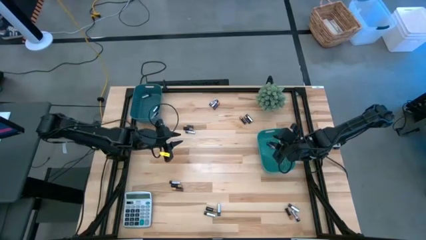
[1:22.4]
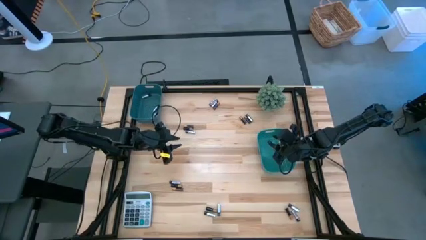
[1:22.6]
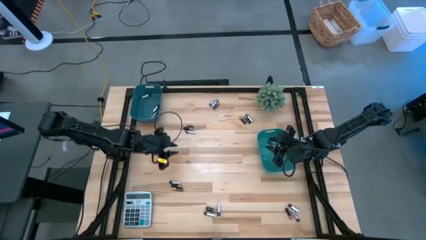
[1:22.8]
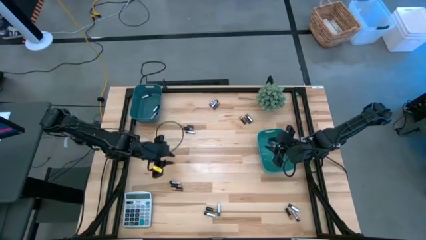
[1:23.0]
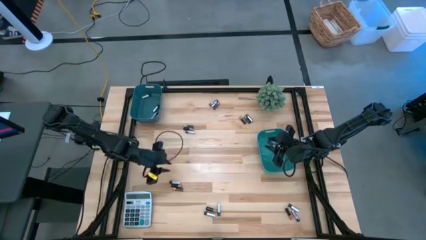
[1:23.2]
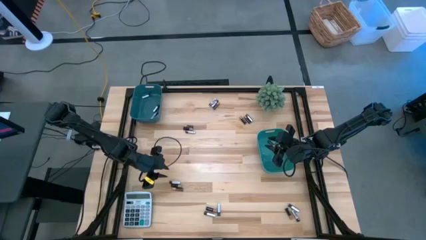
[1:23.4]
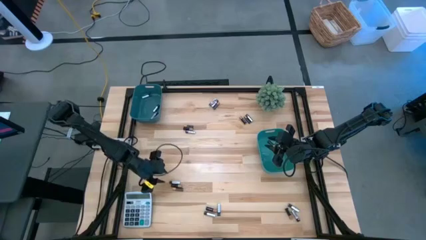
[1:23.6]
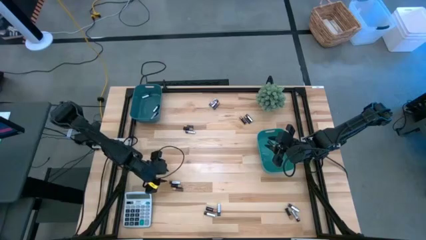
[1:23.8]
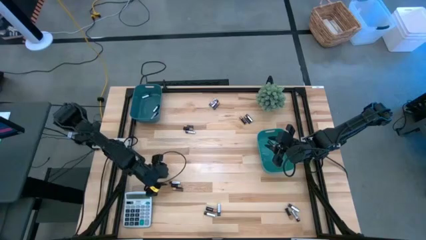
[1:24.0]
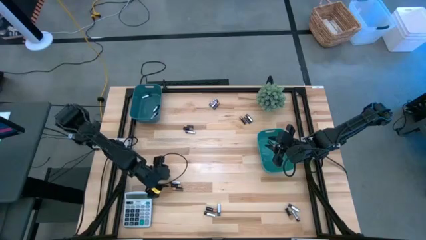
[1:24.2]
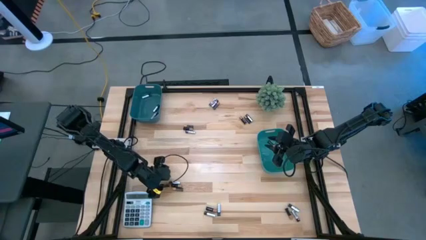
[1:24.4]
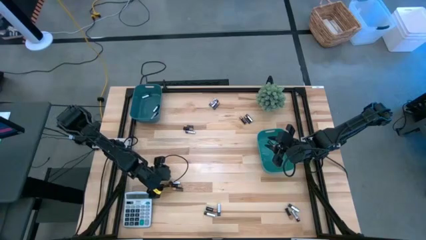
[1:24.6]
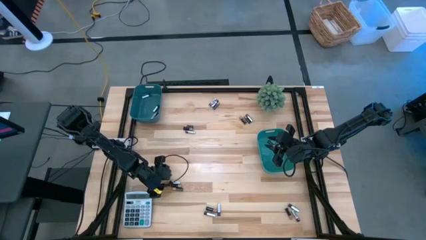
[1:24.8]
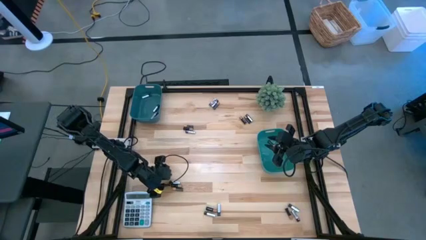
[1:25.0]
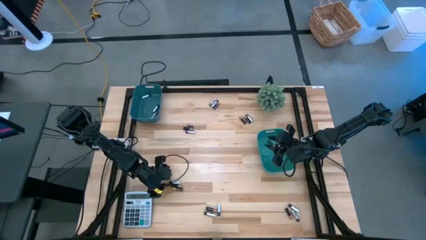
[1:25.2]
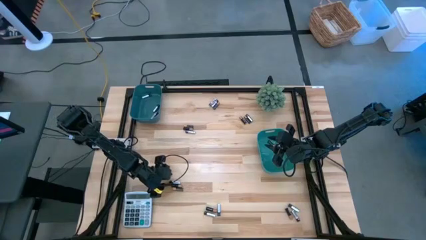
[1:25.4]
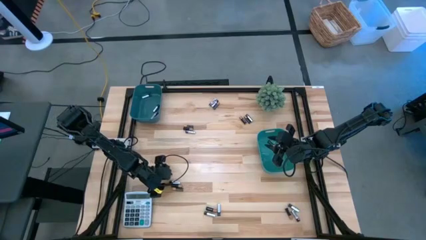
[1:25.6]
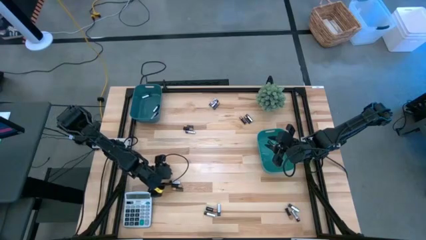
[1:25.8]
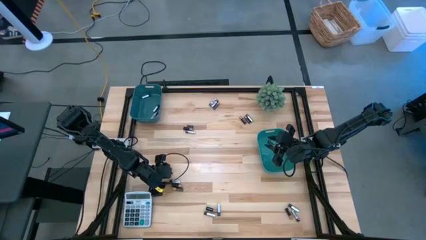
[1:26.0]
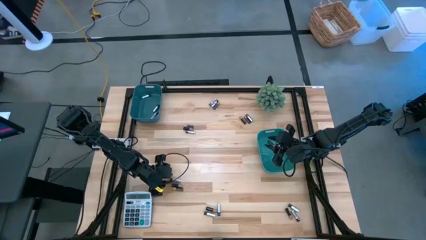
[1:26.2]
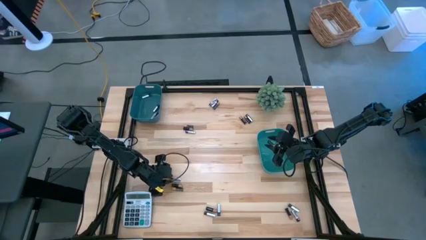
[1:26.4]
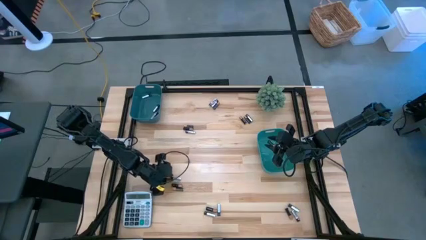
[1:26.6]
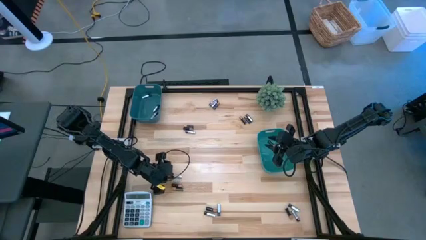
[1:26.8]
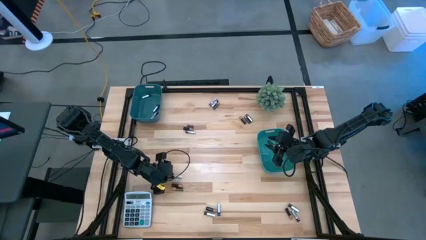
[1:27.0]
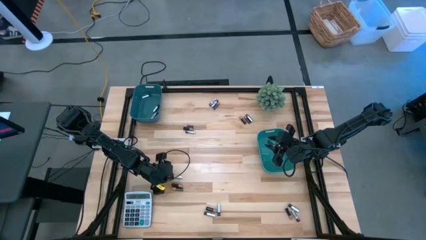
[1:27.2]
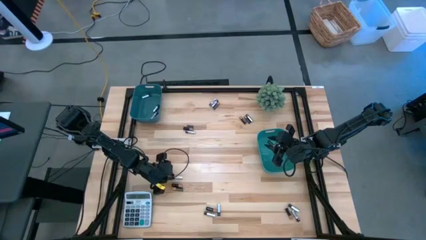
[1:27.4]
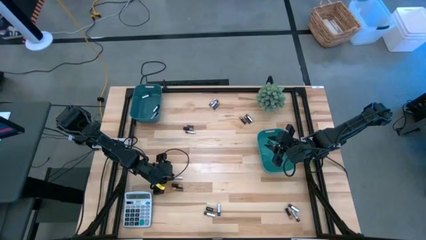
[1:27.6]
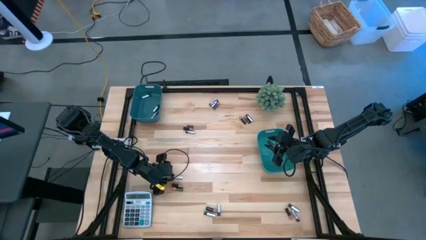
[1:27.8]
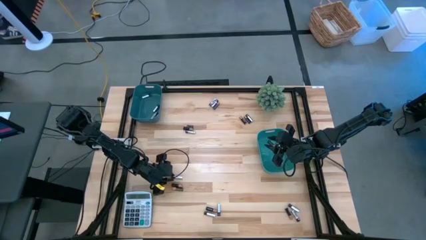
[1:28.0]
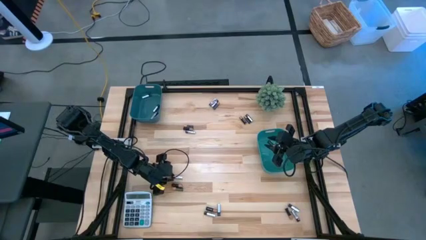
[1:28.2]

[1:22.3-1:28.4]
Task: Sort batteries
Put the black-silver battery into the blue bin

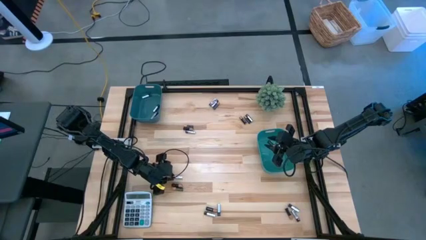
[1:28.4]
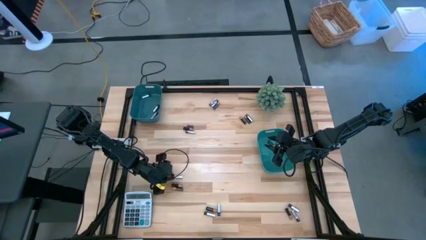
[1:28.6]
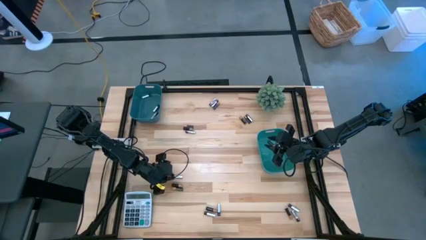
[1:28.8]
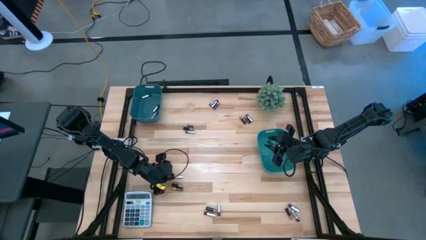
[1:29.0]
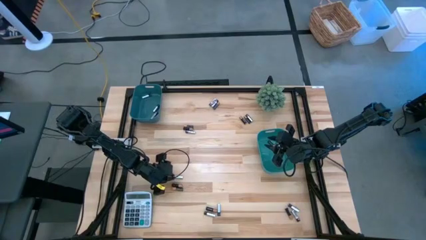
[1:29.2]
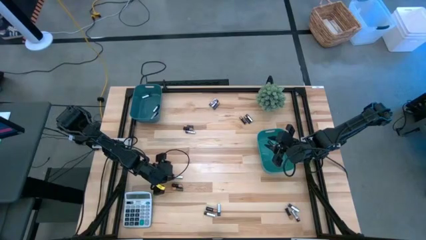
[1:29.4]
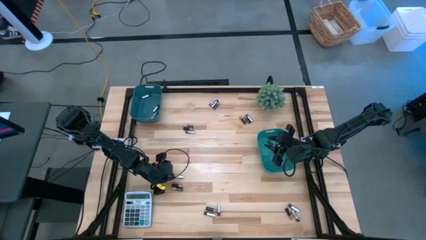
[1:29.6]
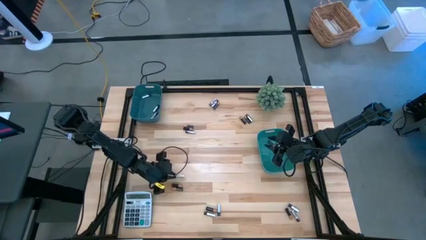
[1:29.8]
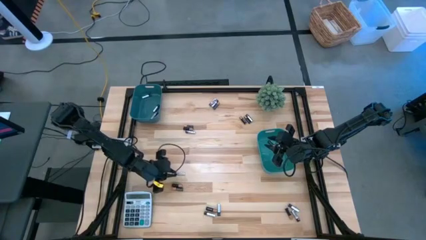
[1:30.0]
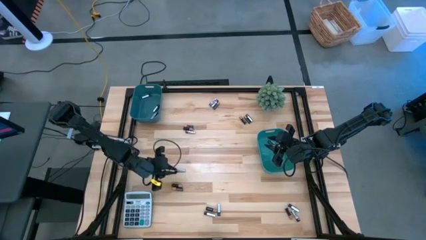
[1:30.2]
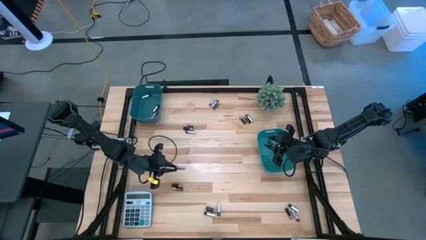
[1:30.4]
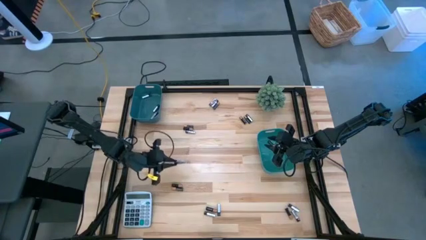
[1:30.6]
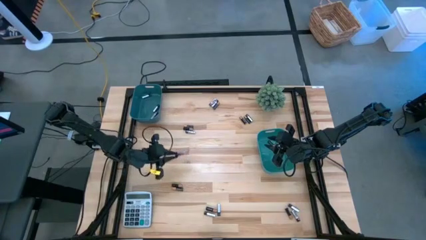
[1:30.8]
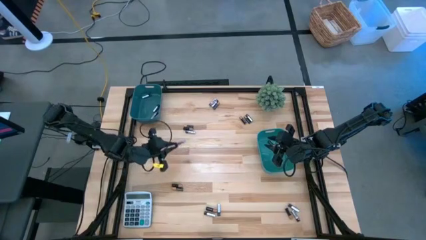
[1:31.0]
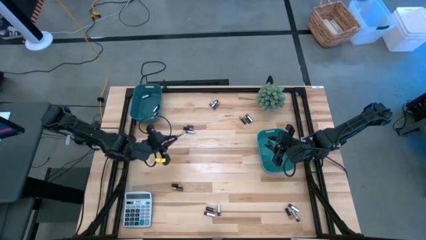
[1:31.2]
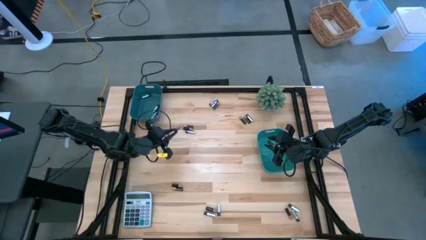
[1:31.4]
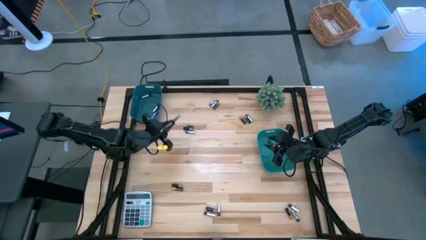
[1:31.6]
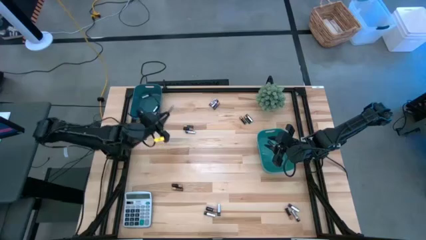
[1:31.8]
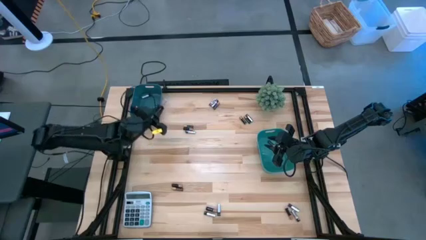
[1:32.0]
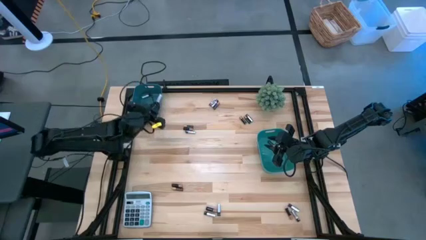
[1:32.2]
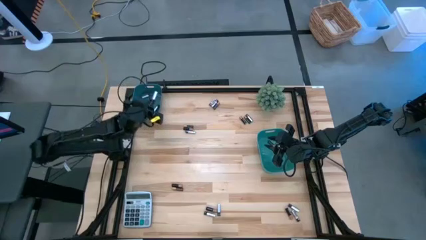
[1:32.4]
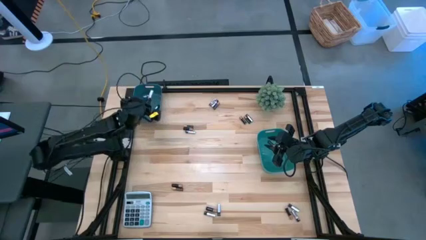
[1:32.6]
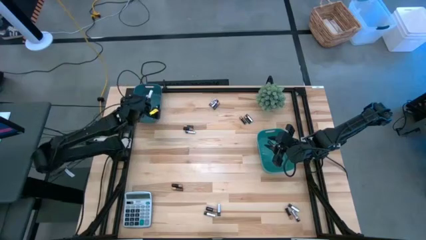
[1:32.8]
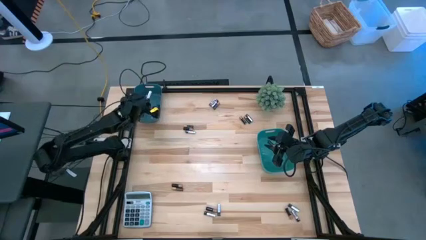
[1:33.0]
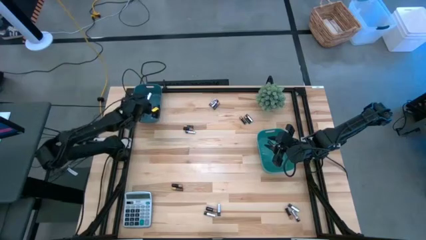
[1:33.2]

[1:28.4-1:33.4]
Put the black-silver battery into the blue bin
